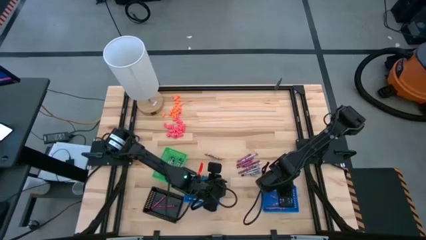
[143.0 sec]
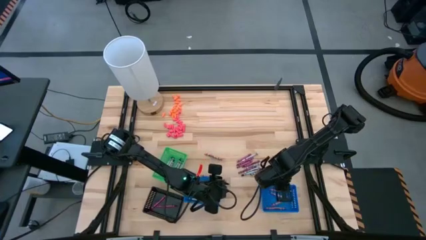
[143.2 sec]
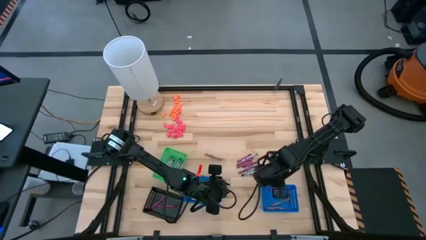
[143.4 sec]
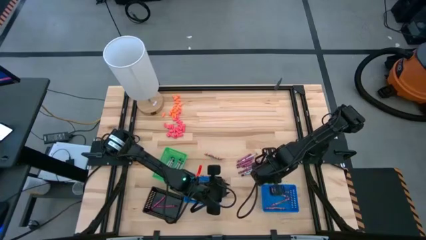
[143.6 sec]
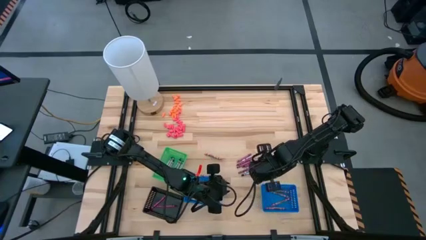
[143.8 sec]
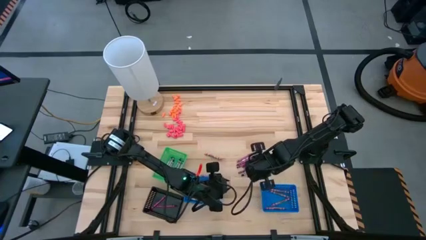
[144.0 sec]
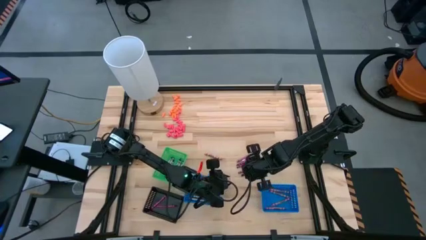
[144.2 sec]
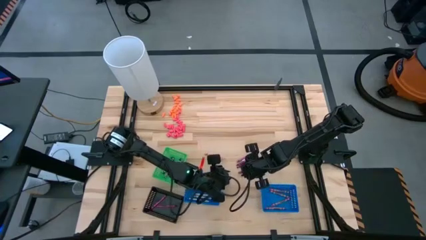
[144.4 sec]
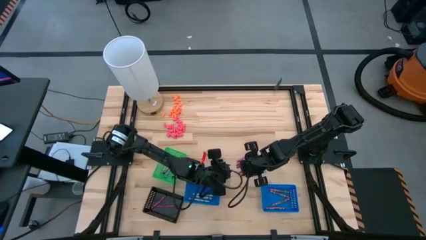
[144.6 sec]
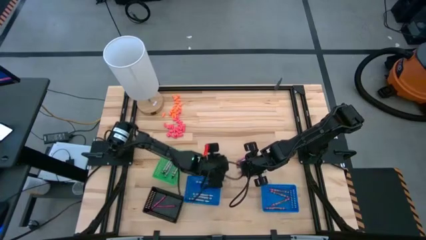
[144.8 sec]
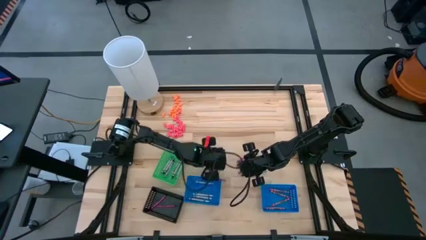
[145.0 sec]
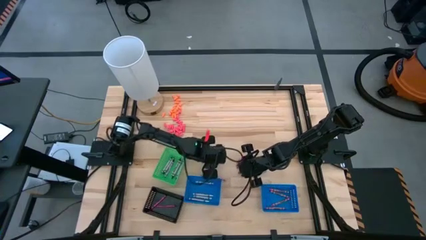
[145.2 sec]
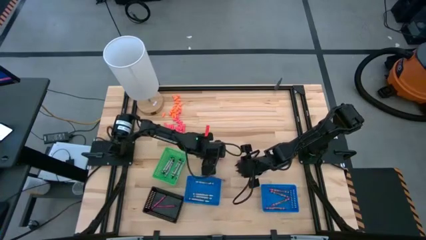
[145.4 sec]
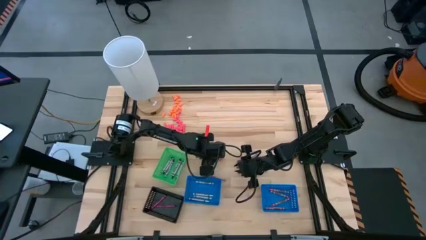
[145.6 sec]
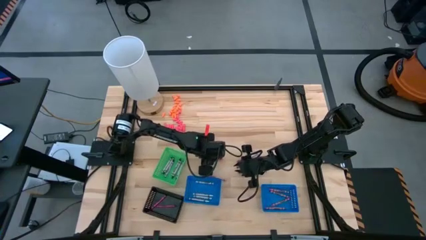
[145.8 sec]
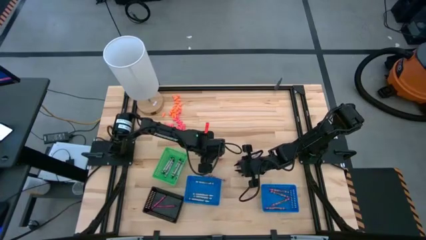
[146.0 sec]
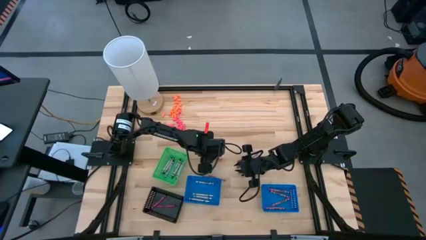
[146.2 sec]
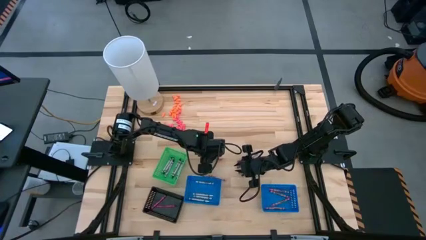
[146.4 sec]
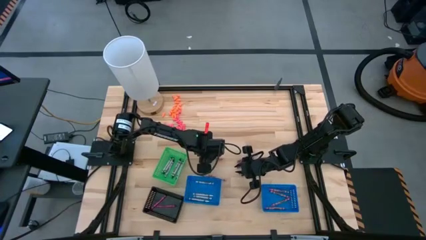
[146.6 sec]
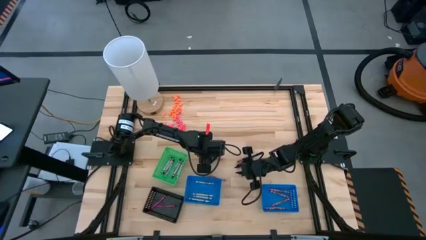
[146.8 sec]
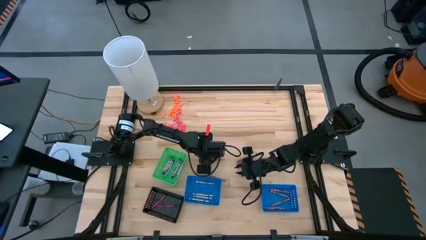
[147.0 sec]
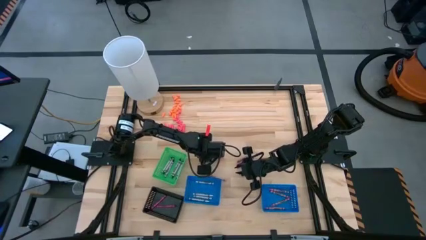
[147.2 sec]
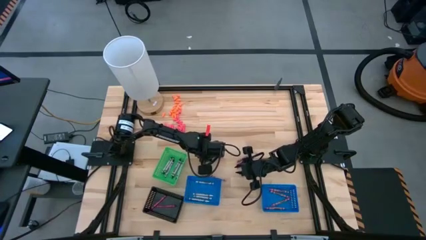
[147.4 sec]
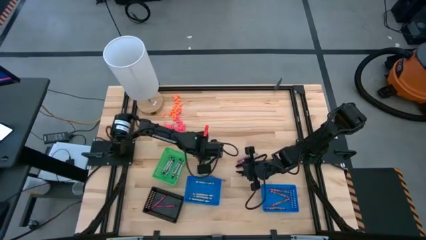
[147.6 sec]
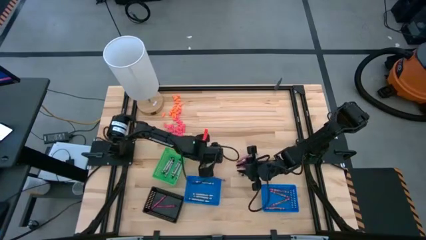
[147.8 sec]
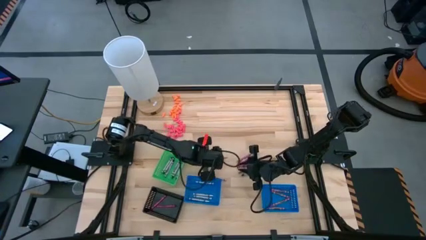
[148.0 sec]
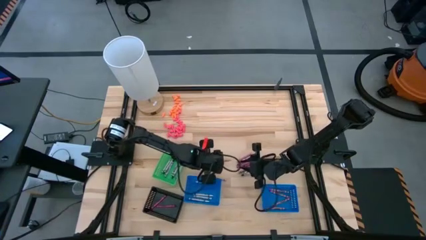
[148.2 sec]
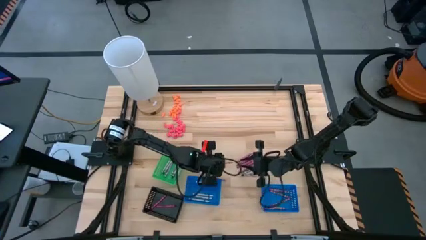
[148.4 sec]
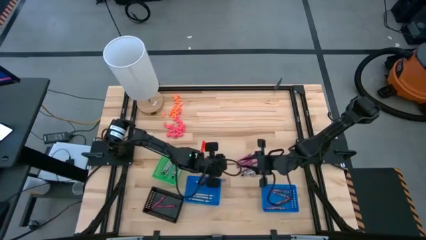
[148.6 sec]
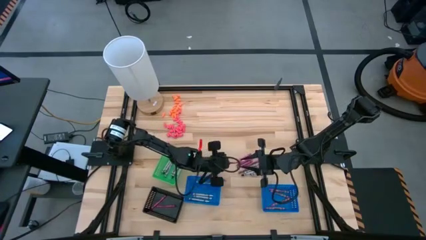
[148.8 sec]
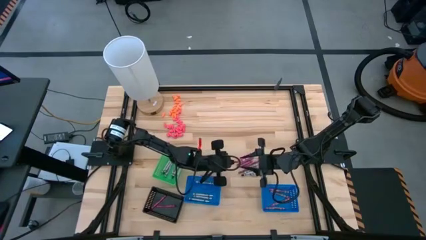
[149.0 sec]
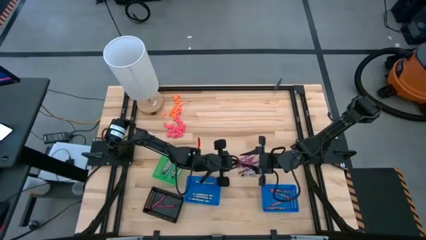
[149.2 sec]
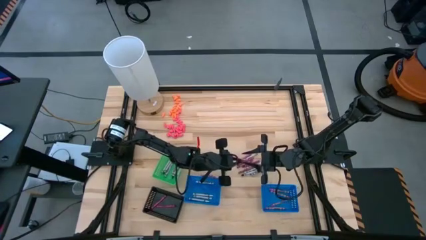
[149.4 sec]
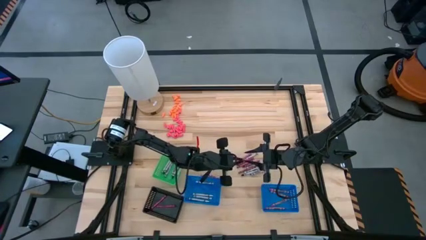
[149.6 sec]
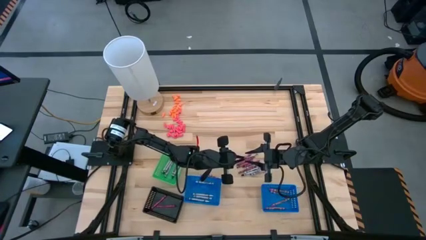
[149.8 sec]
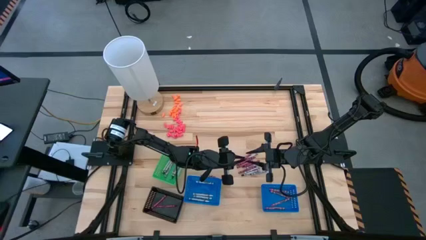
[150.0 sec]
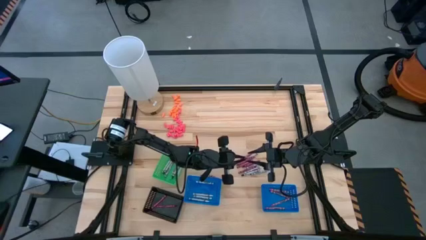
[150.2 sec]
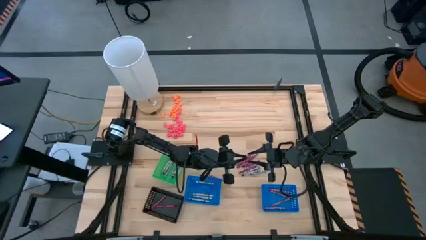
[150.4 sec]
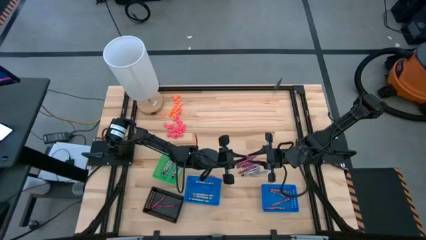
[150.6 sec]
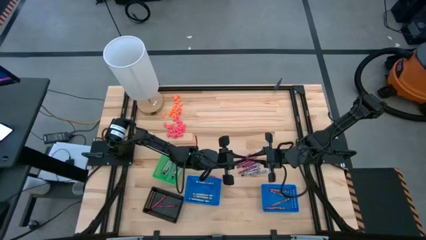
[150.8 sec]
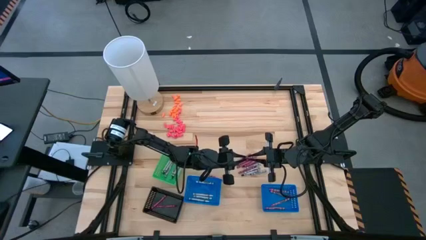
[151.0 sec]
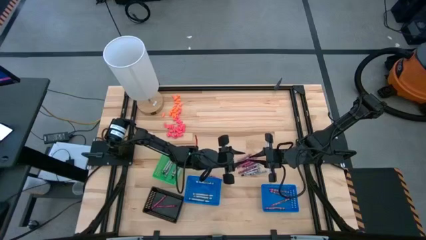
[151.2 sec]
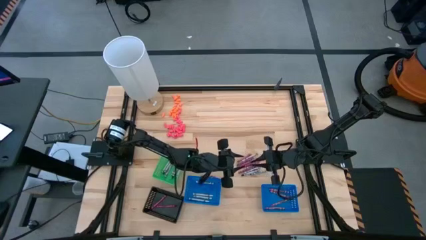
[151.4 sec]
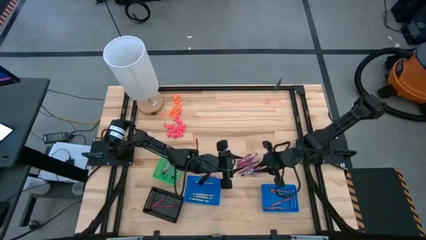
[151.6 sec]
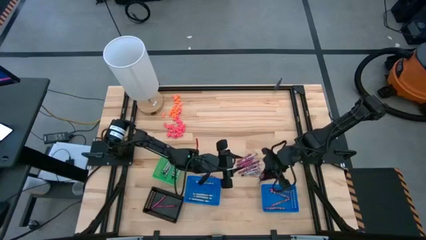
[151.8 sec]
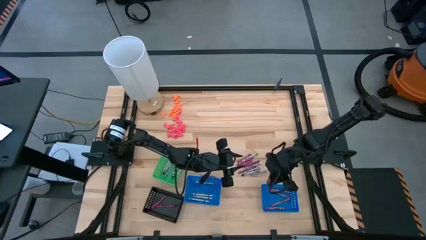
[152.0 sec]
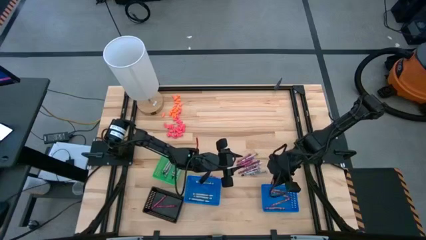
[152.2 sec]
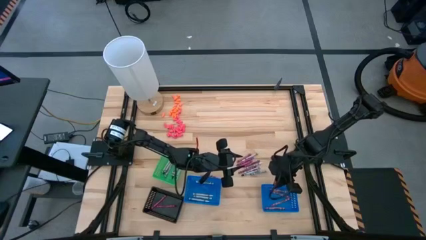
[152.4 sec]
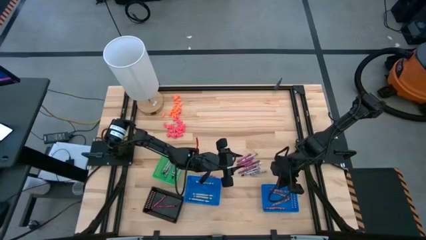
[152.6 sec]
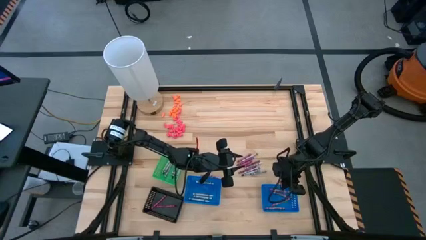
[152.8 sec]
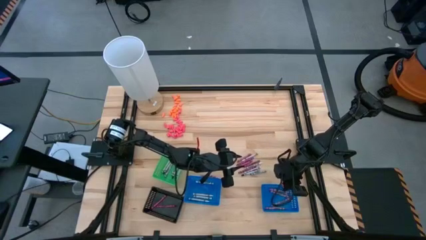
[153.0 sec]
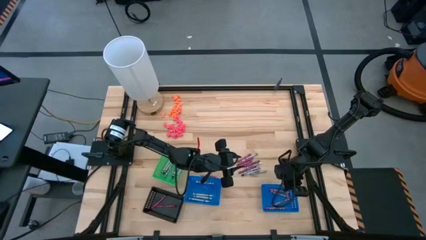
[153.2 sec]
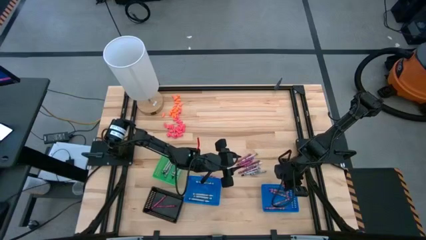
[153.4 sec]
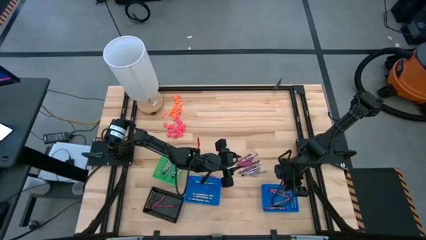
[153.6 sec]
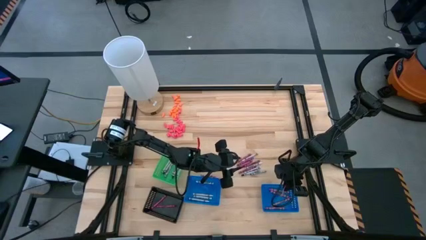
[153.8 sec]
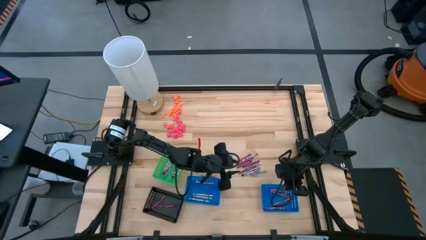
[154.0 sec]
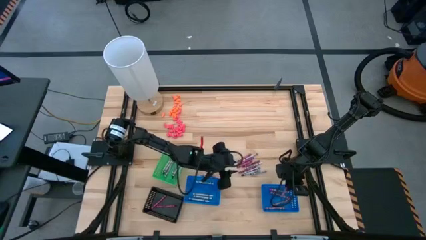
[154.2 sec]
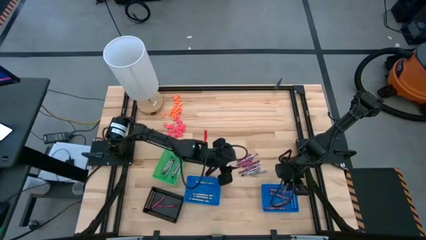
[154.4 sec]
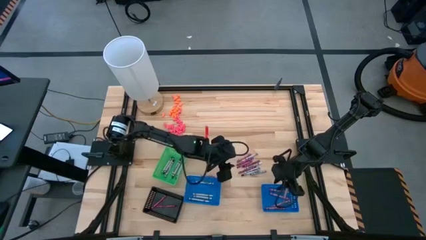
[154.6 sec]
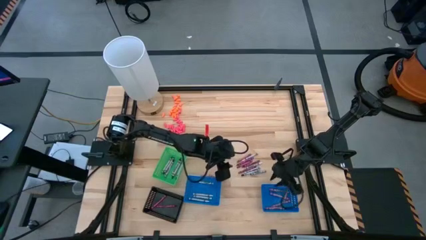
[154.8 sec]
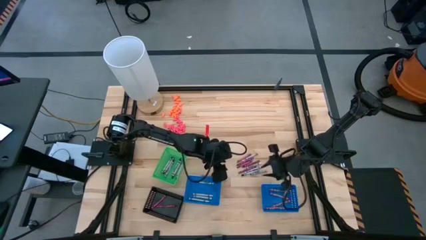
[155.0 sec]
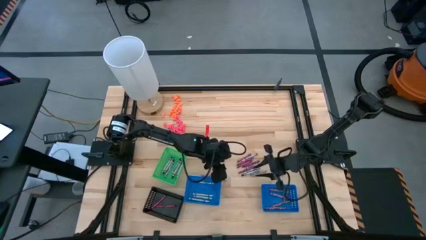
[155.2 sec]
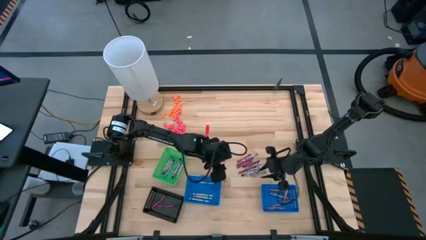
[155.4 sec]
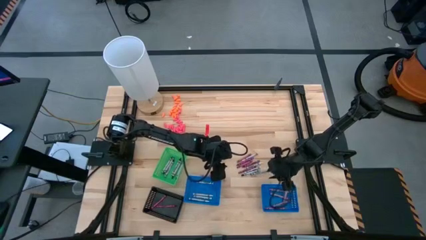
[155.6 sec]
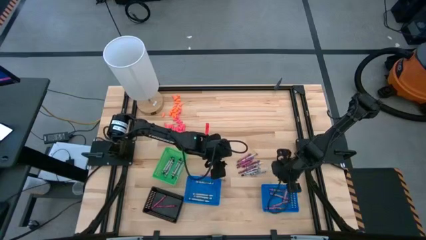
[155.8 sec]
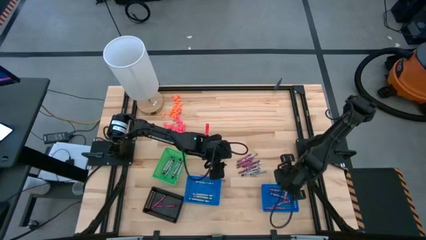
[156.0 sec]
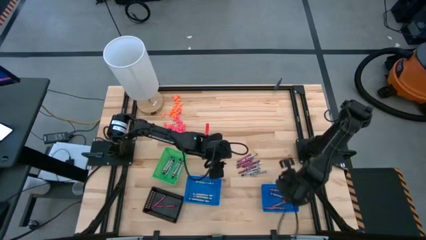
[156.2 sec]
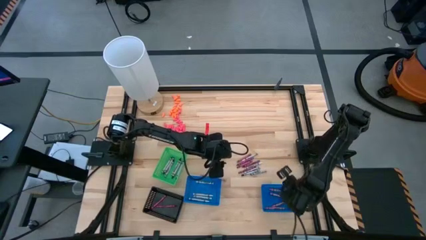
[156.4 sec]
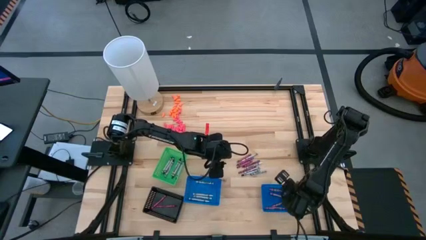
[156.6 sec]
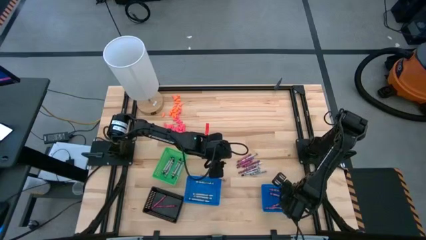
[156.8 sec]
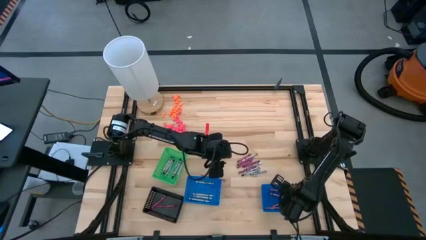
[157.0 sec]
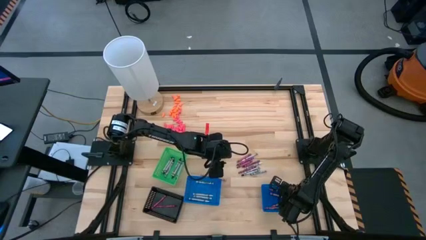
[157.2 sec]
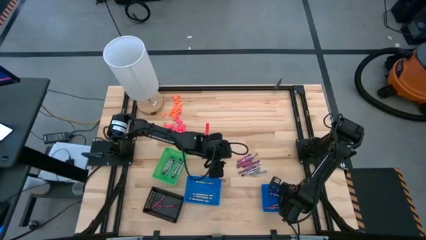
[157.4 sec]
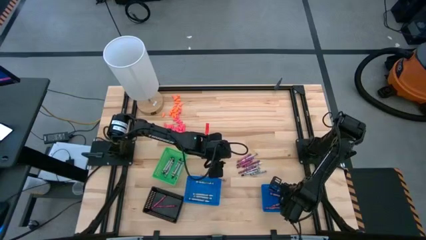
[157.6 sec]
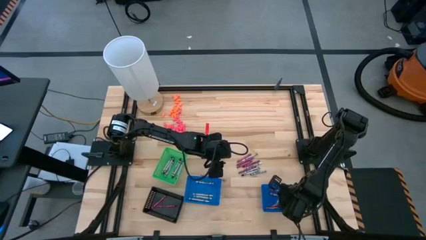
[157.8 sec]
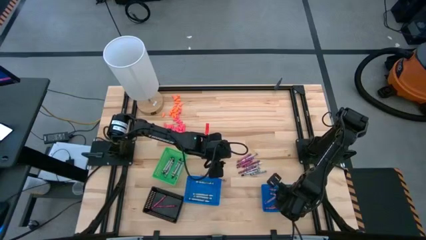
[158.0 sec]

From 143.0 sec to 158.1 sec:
Task: Sort crayons
Put the pink crayon into the left blue basket
